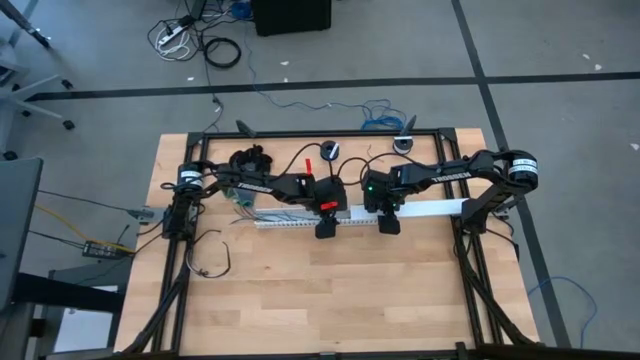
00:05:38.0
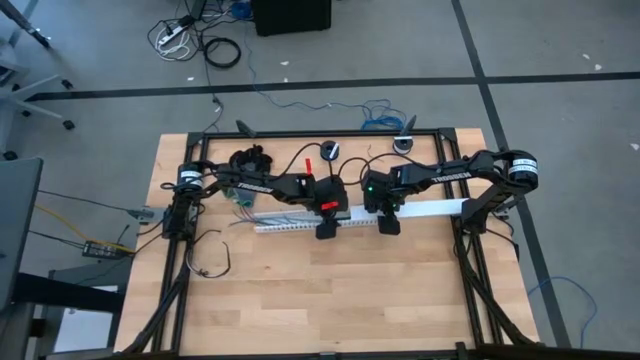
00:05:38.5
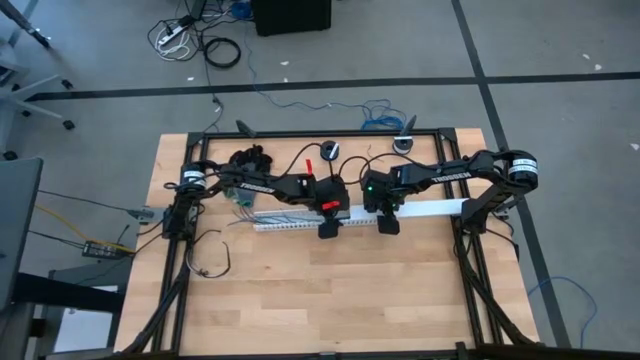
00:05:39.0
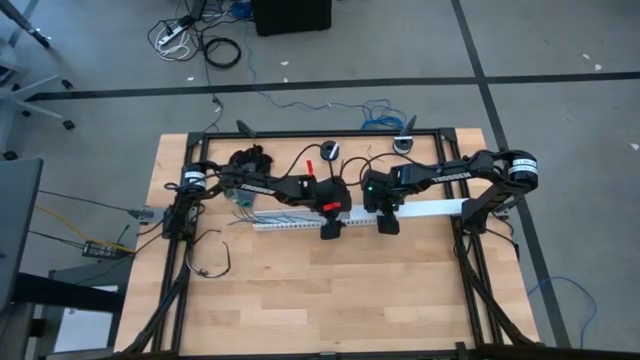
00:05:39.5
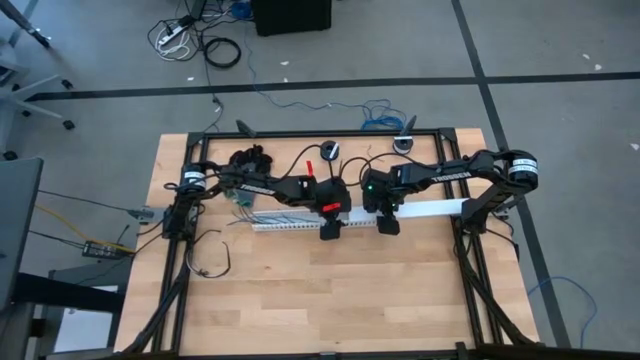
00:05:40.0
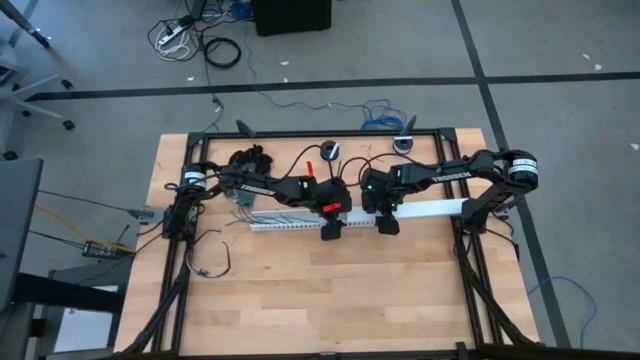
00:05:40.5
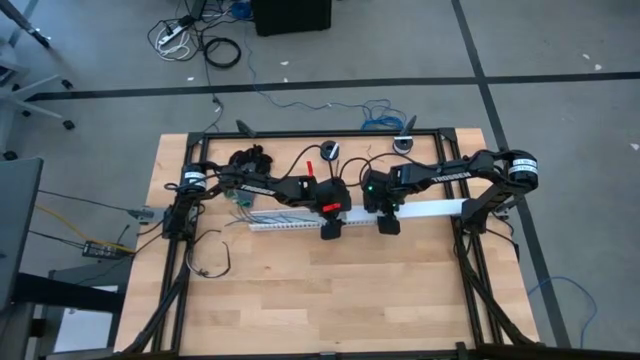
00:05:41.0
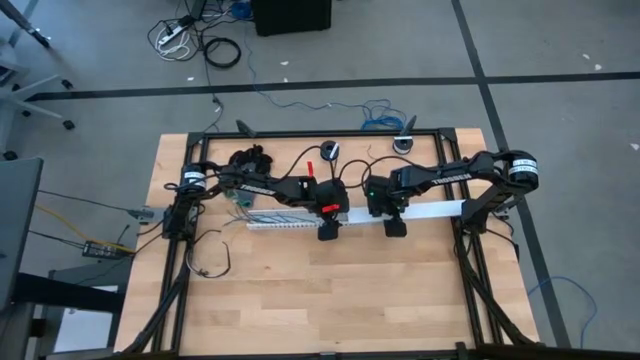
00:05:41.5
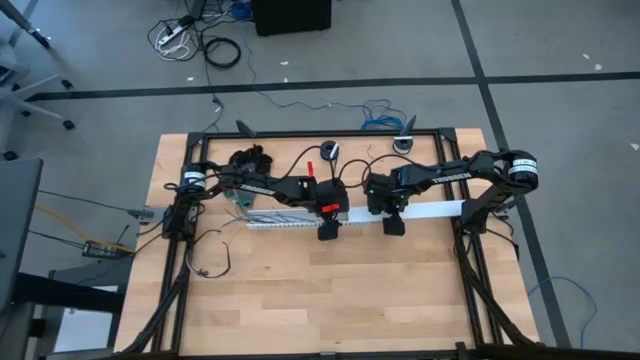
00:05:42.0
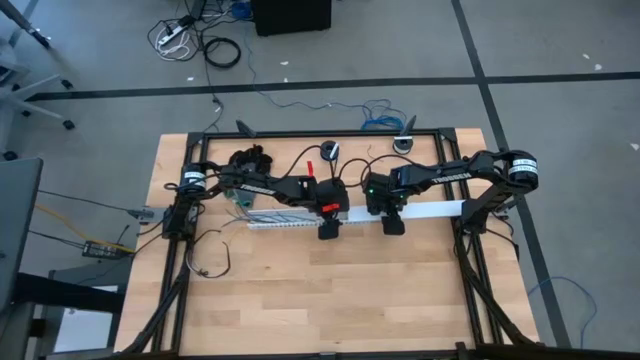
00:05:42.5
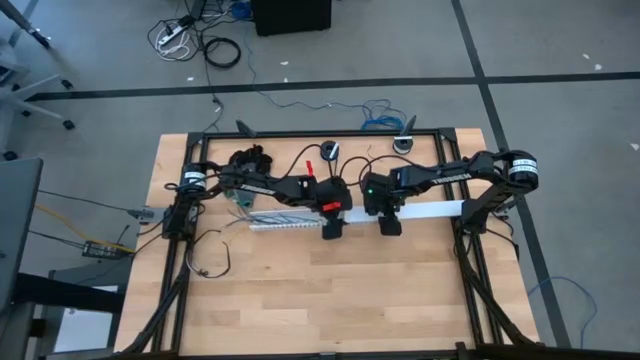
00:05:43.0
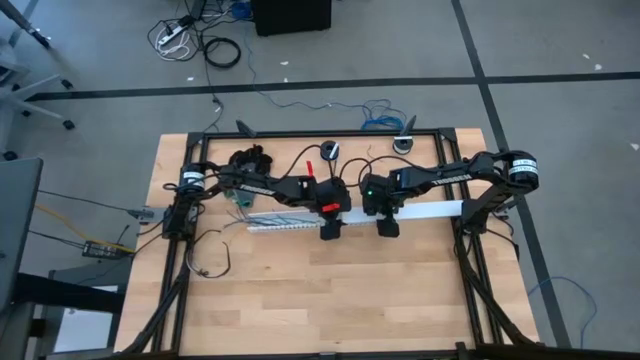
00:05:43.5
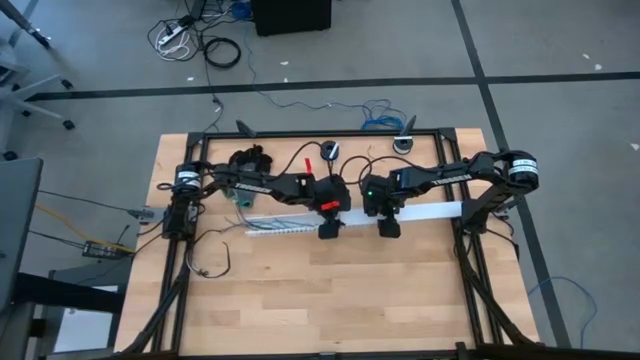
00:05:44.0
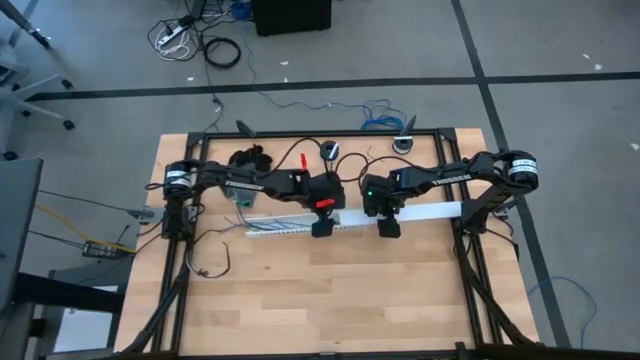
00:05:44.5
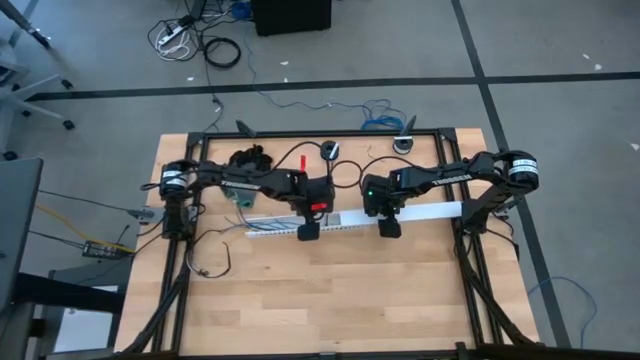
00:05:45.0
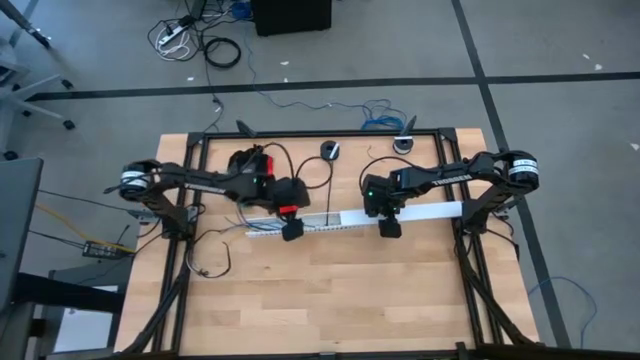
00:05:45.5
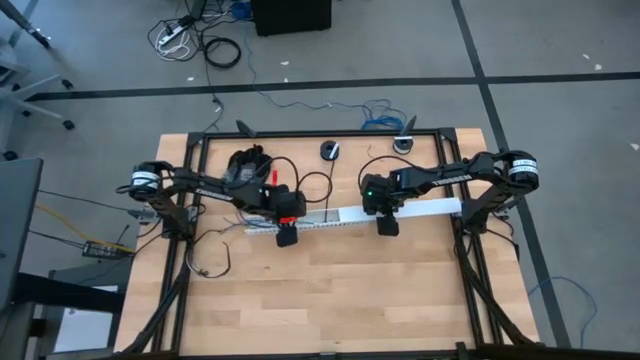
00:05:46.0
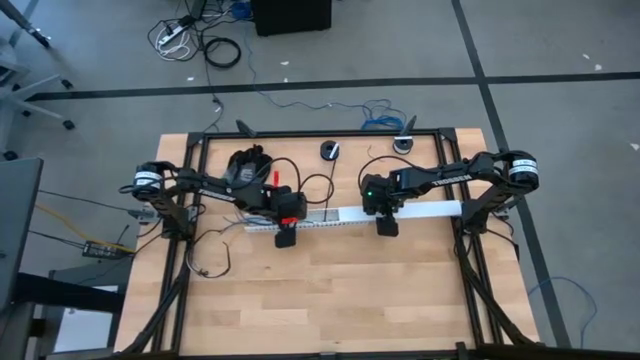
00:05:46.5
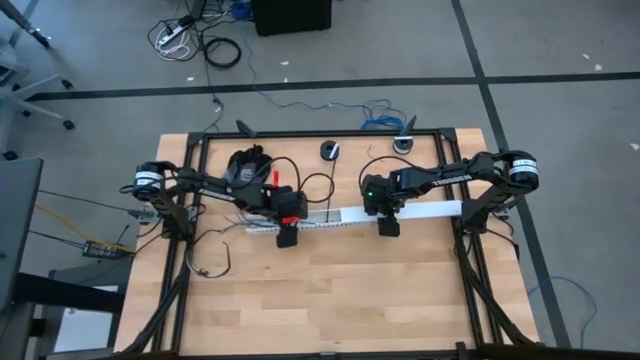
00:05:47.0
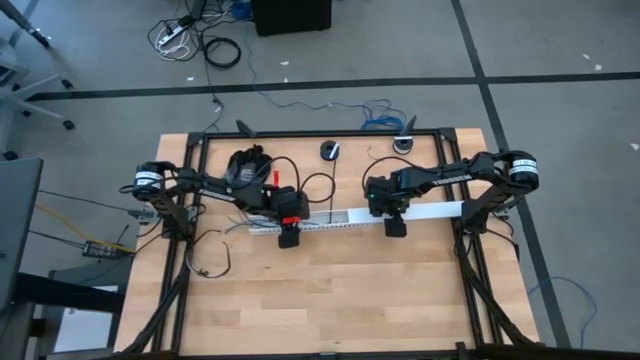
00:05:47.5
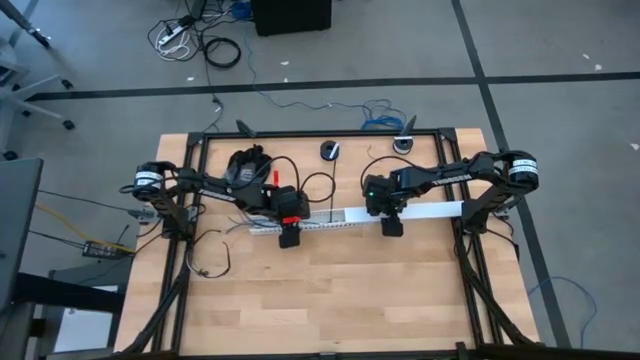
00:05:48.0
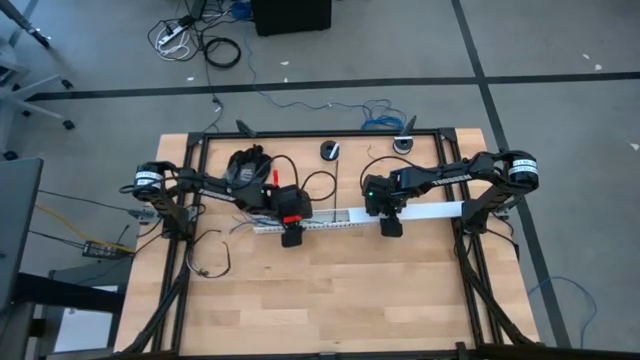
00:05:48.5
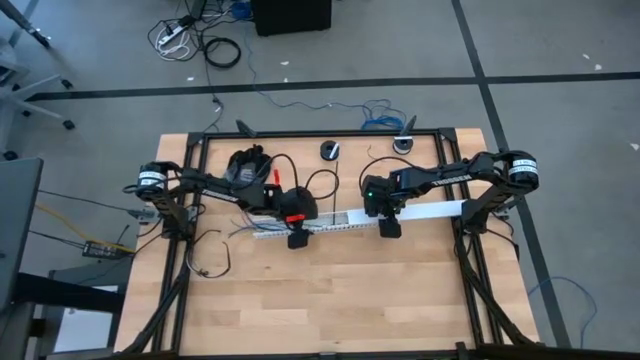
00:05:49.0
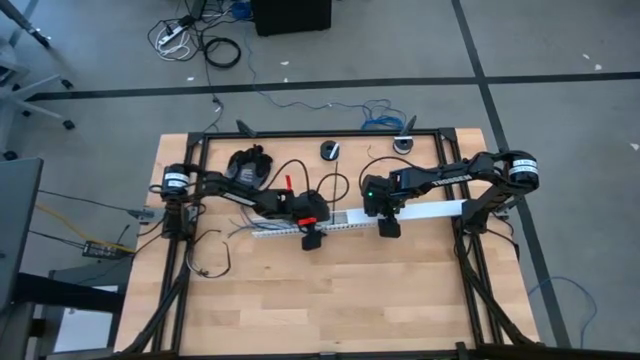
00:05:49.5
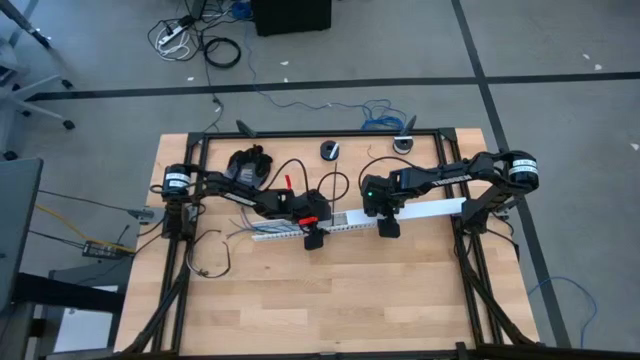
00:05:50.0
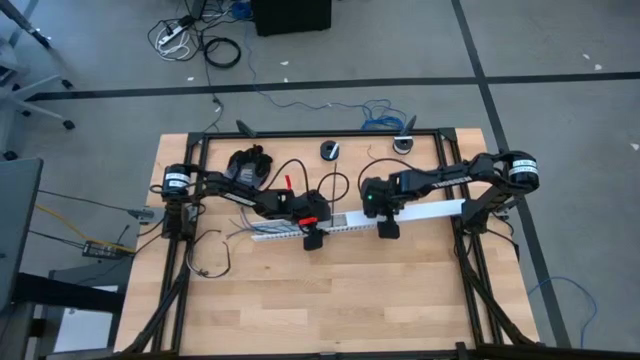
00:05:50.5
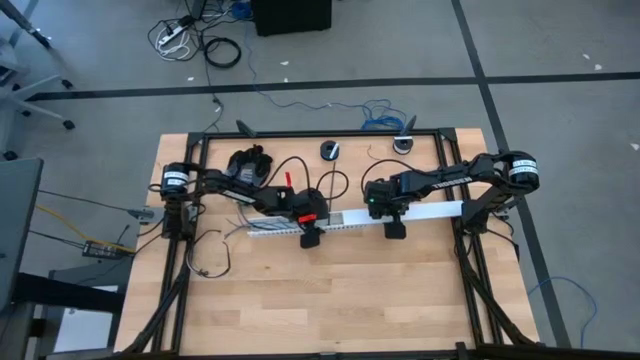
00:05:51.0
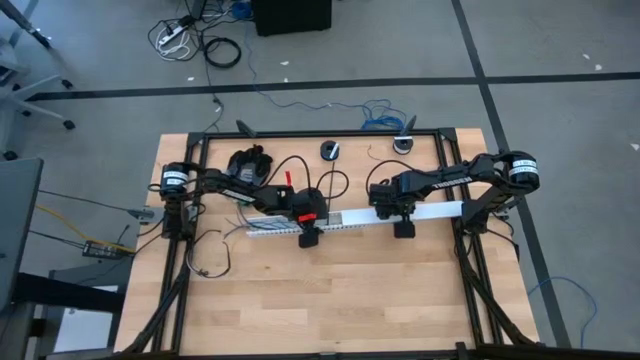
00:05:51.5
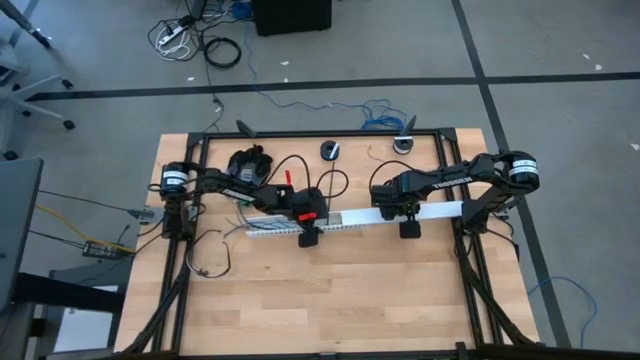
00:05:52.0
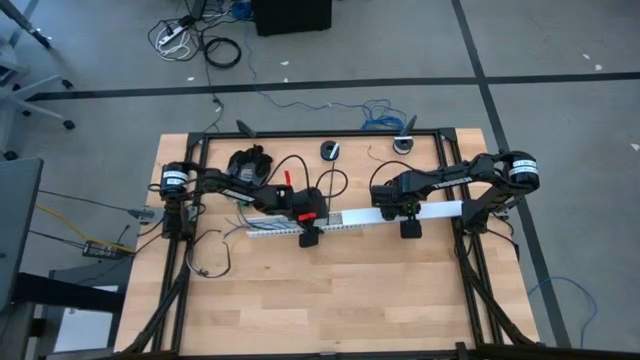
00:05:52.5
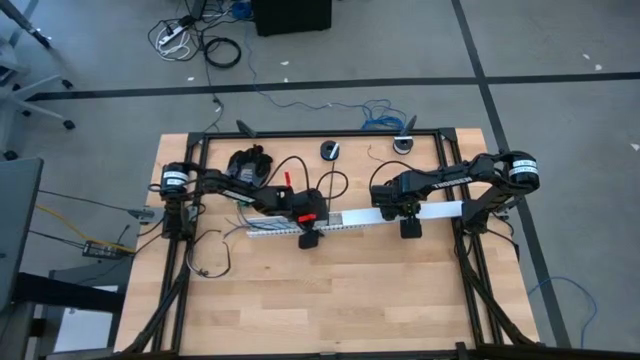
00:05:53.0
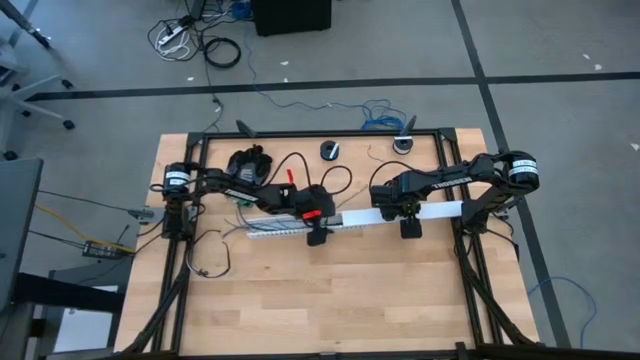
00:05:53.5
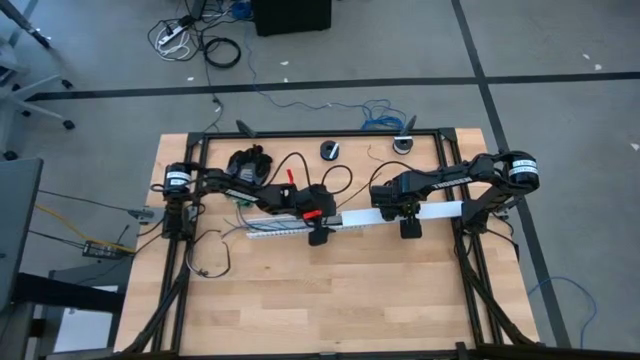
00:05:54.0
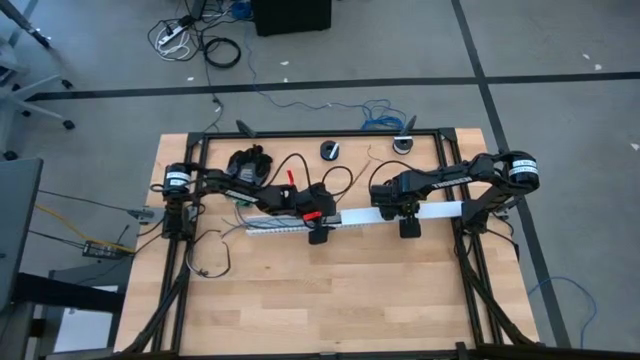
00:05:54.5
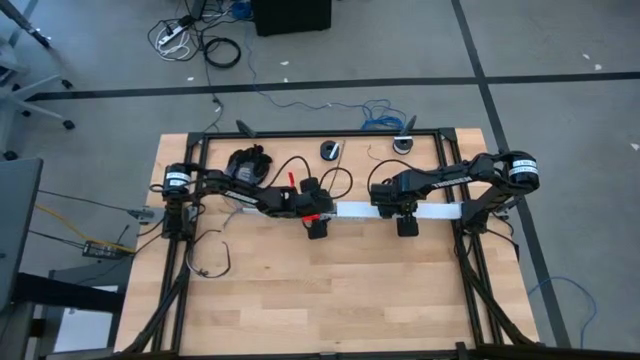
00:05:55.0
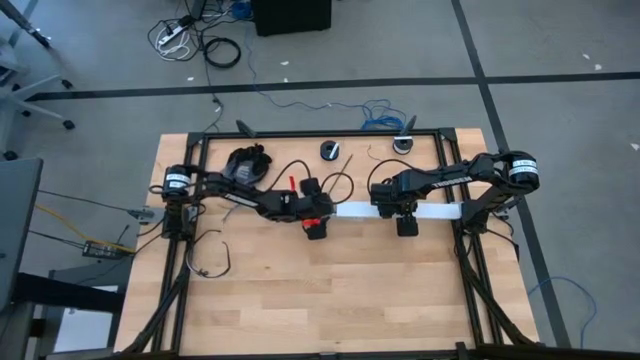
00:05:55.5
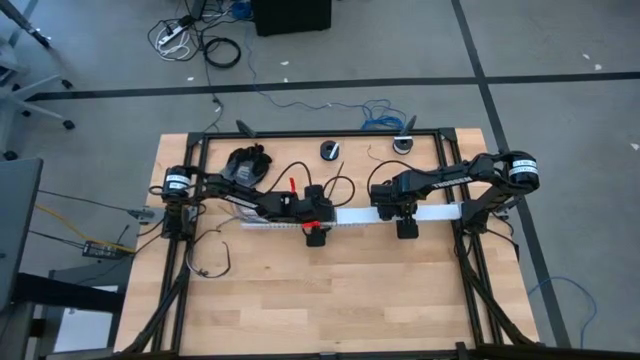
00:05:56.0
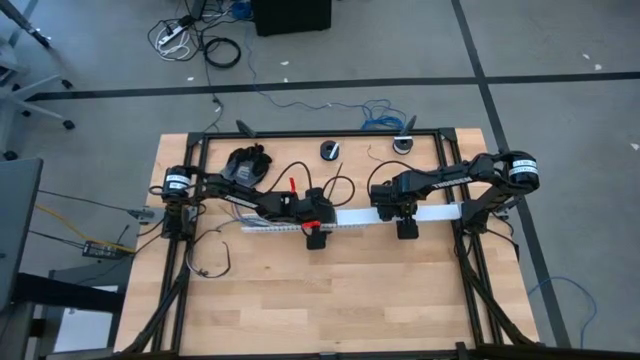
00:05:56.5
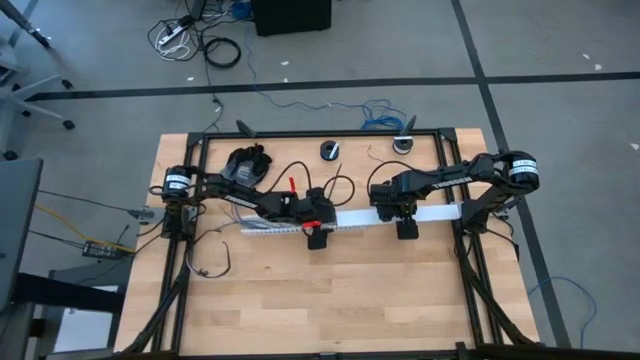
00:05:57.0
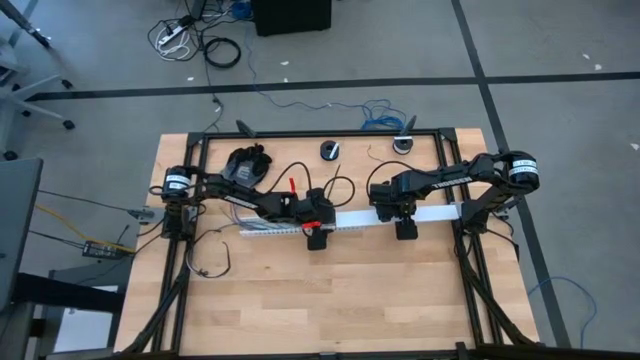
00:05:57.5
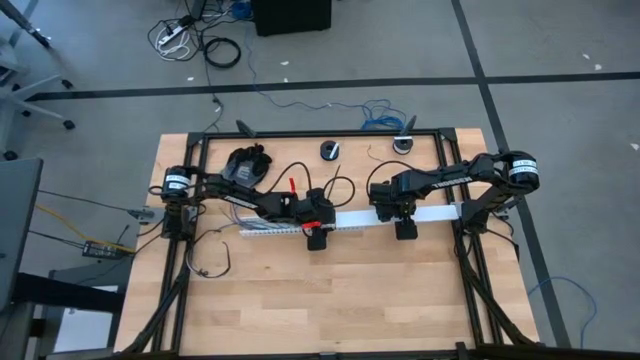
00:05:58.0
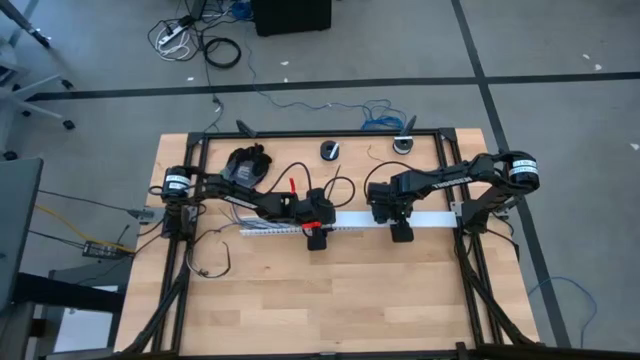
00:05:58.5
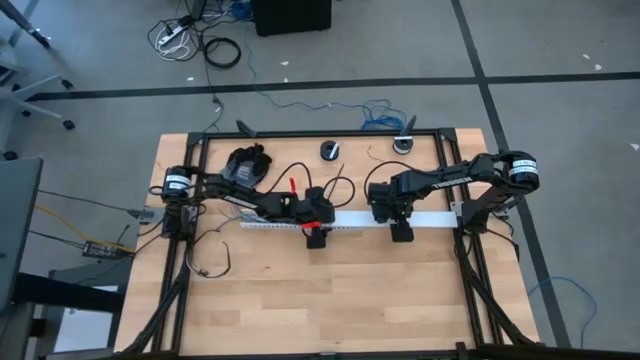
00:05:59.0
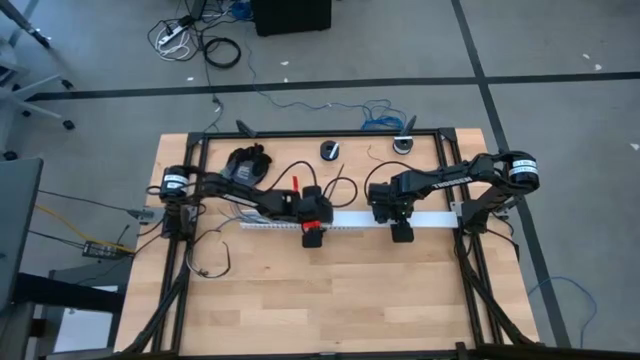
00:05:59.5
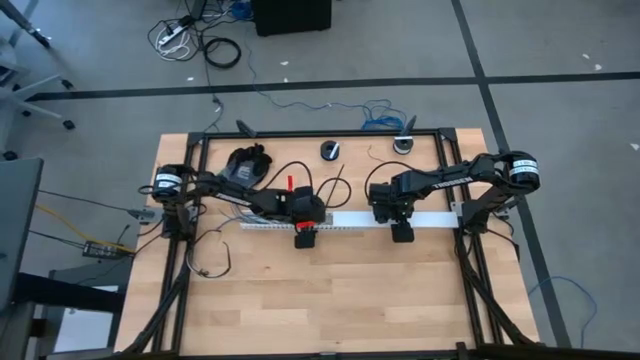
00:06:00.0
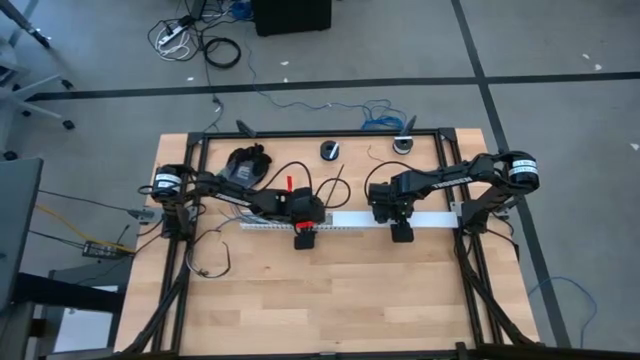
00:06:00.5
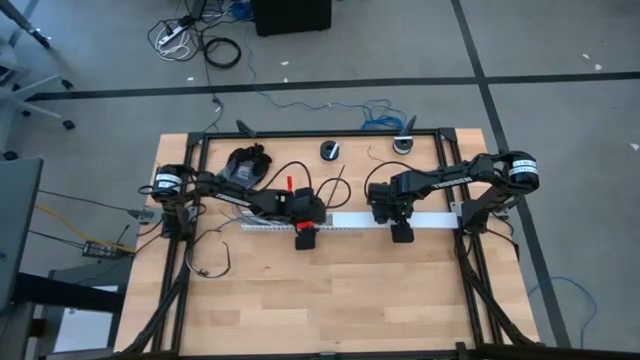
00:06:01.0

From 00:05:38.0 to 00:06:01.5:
Task: Ziptie cables
Close the white cable duct
